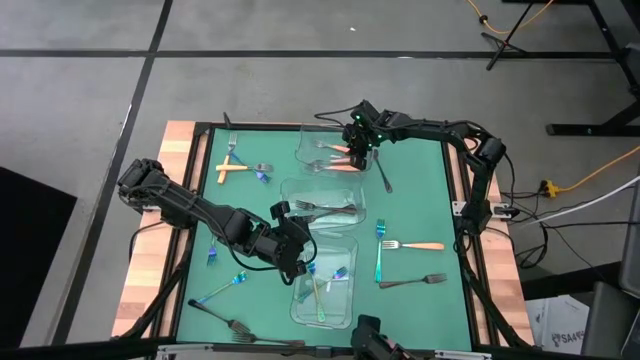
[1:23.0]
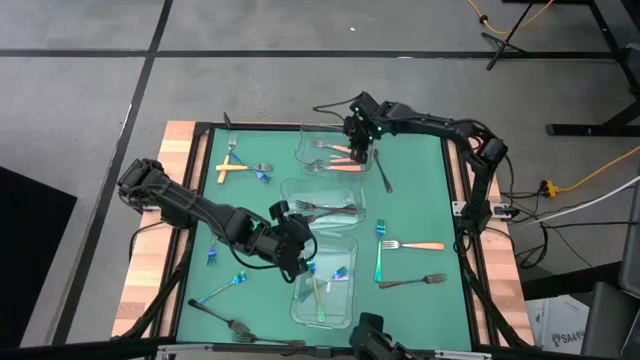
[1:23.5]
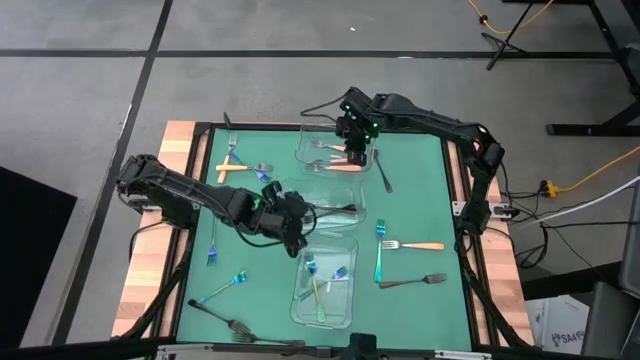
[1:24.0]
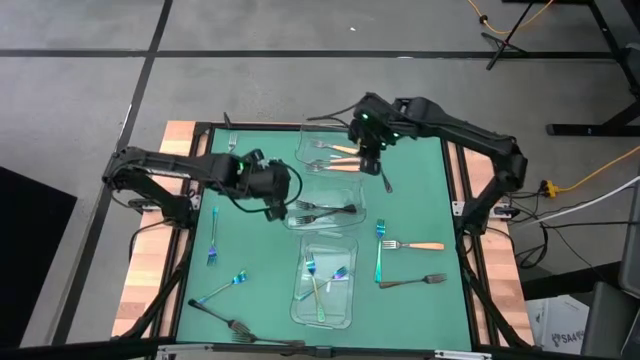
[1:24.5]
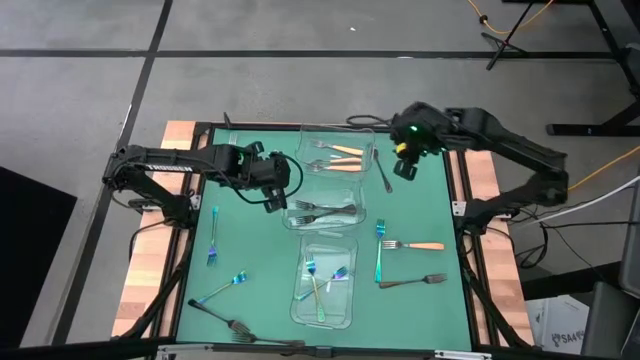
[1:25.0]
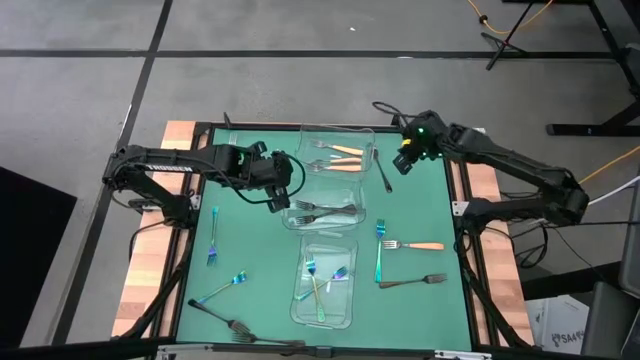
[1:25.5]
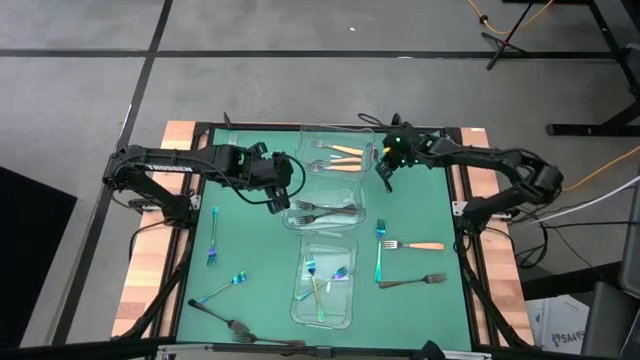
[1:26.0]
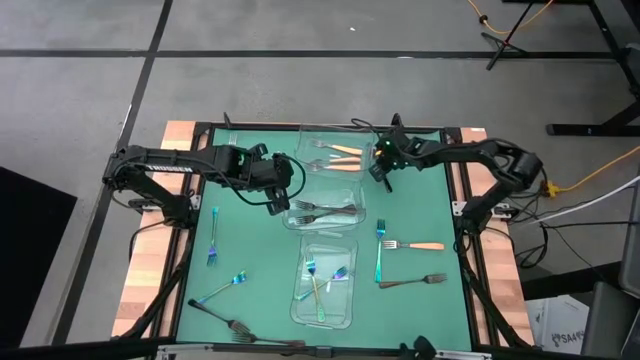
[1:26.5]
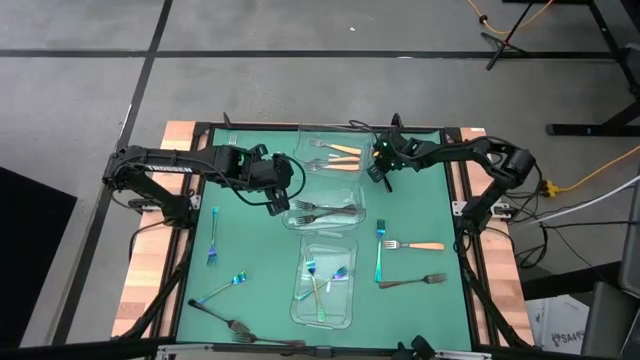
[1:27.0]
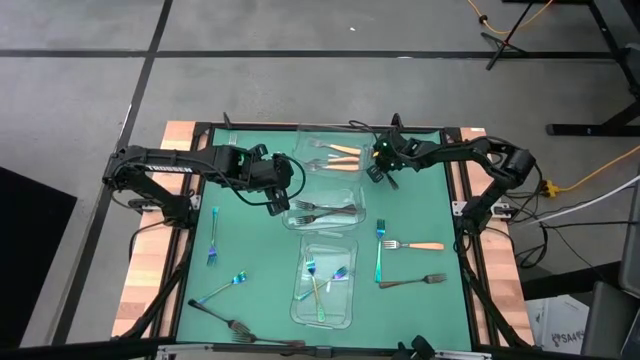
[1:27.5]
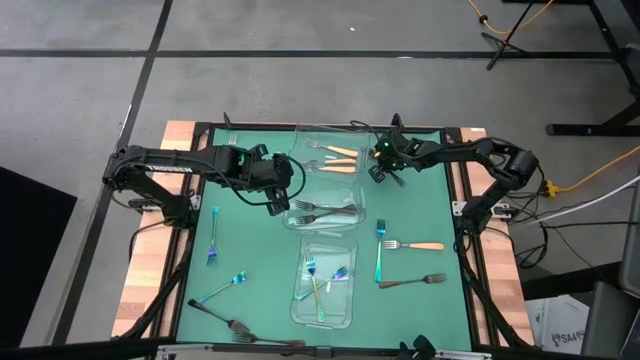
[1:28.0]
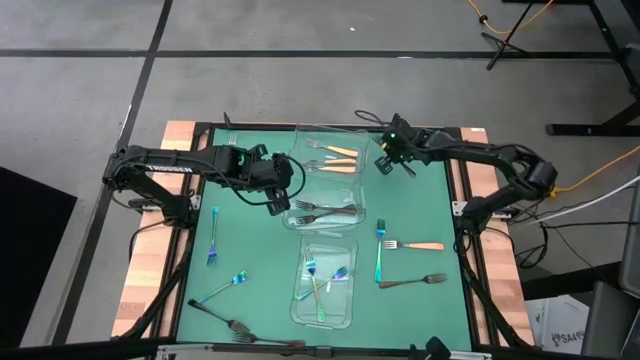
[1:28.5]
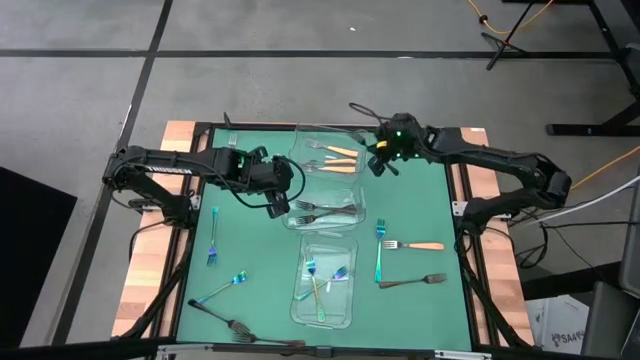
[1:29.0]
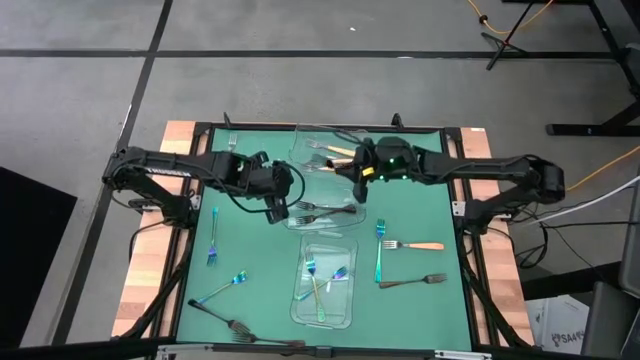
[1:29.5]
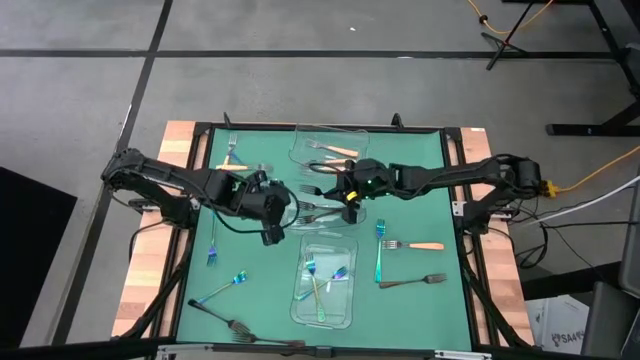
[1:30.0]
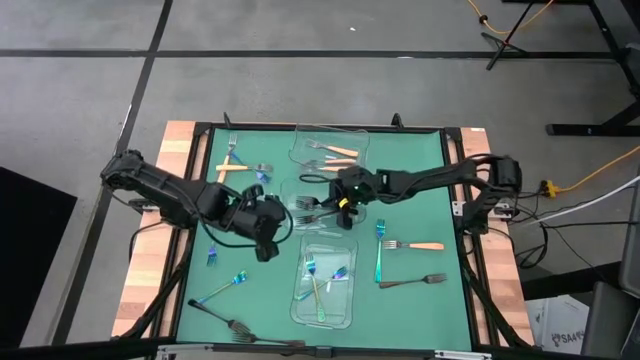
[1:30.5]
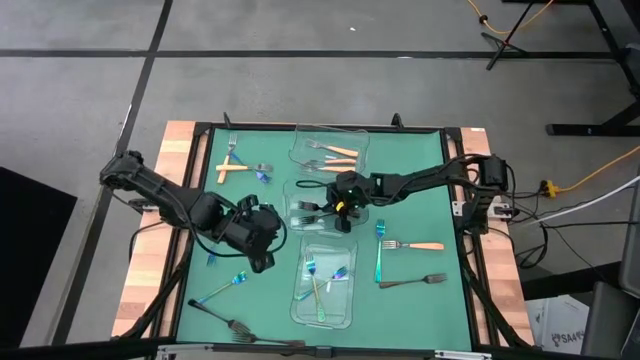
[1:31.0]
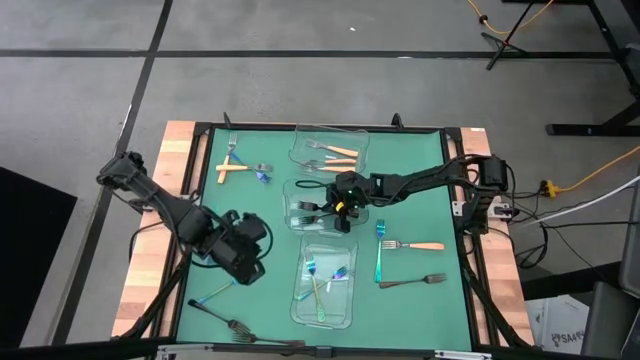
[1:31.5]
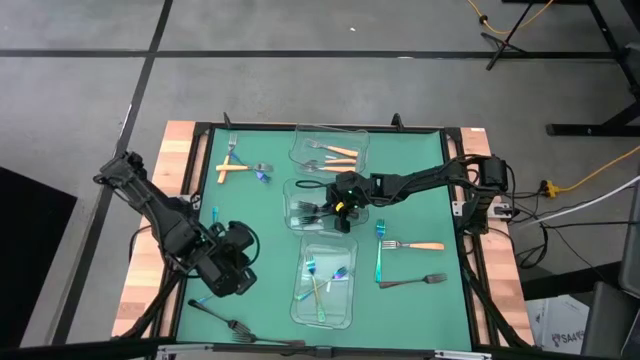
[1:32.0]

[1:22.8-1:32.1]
Task: Sort silverware by color (type)
Put the black fork into the middle transparent bin

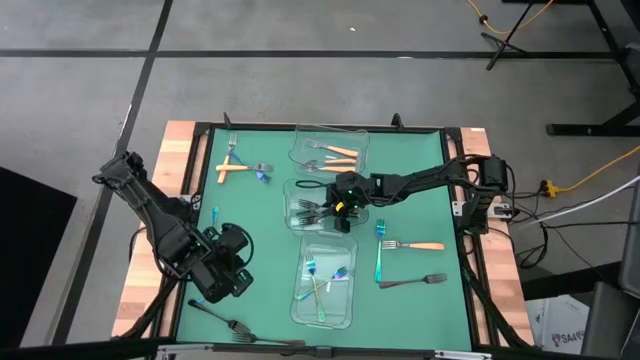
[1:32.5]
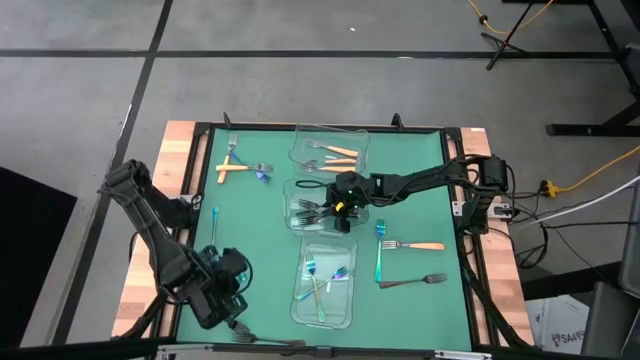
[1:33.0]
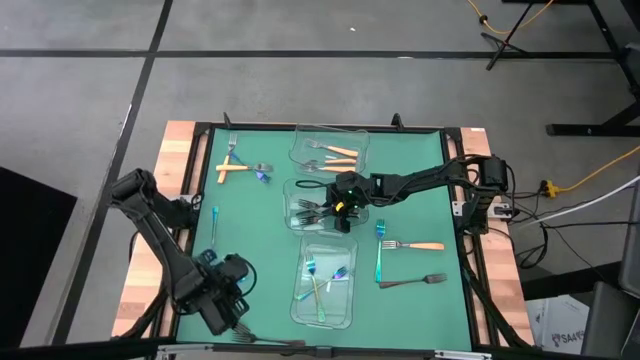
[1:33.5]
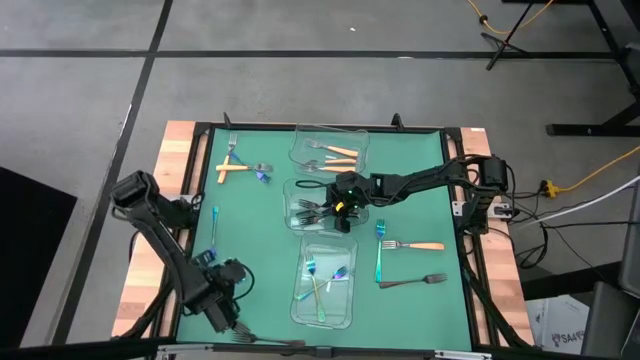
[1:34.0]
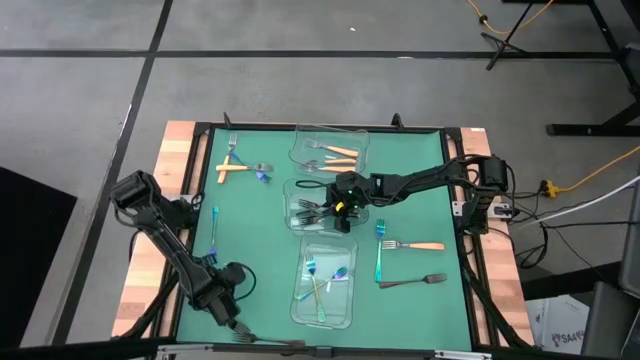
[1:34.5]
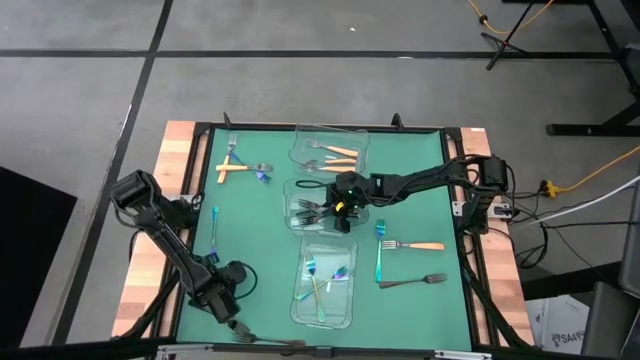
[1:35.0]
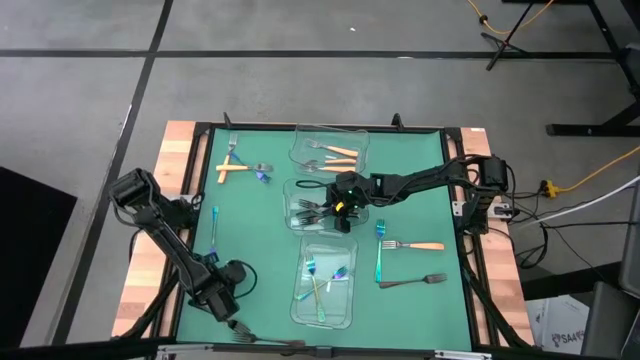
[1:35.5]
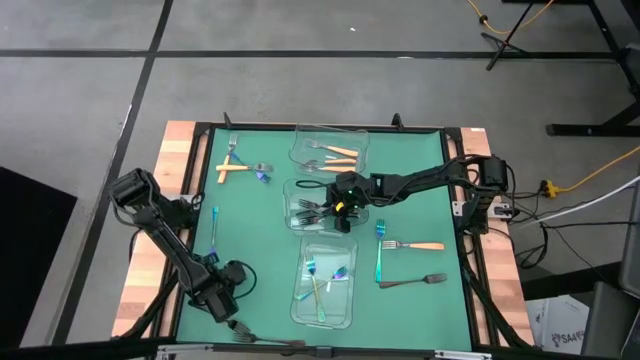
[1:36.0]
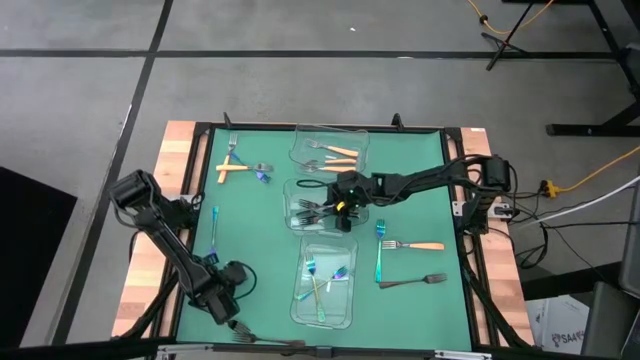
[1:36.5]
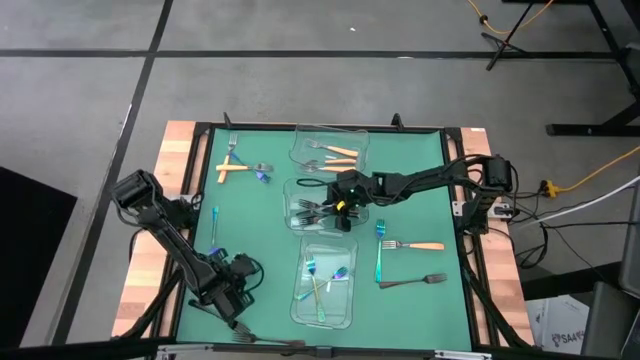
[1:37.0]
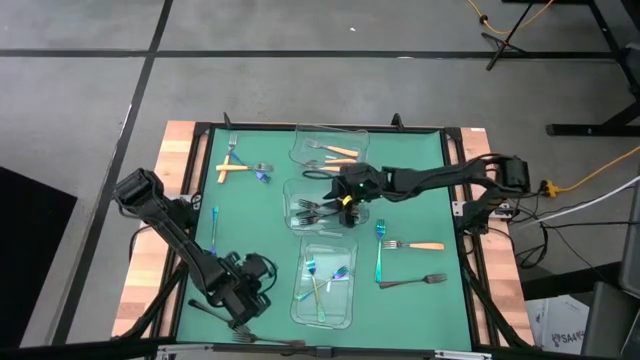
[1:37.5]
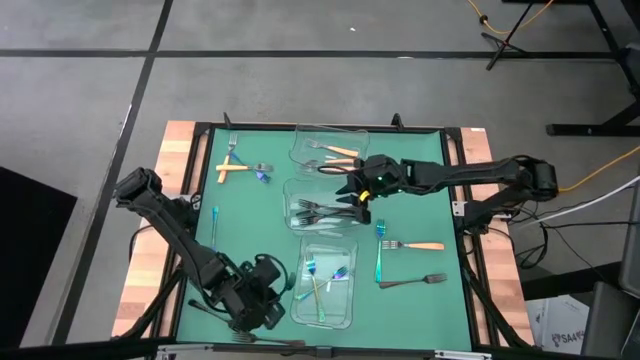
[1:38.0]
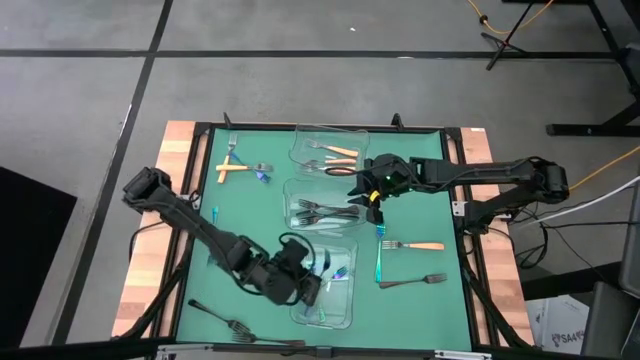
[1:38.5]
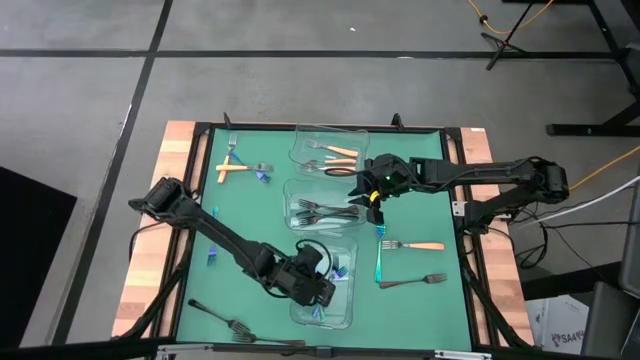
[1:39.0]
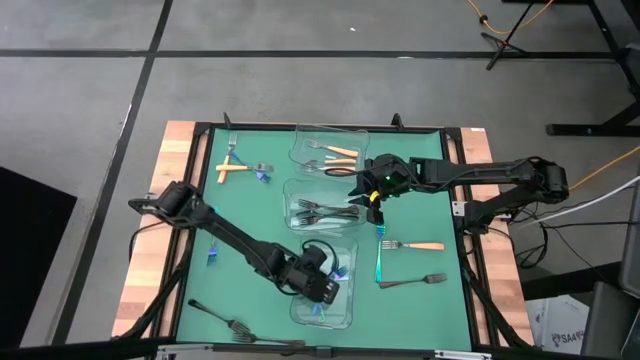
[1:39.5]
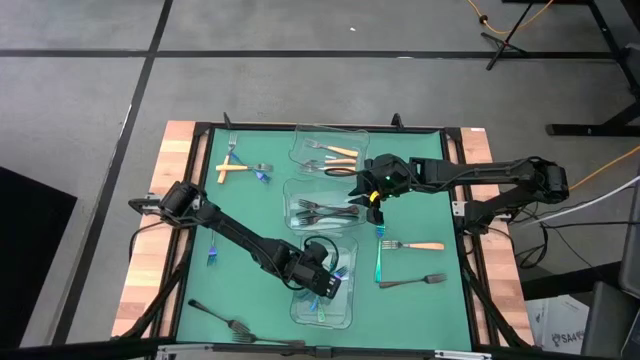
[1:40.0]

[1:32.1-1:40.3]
Put the blue fork into the bottom transparent bin

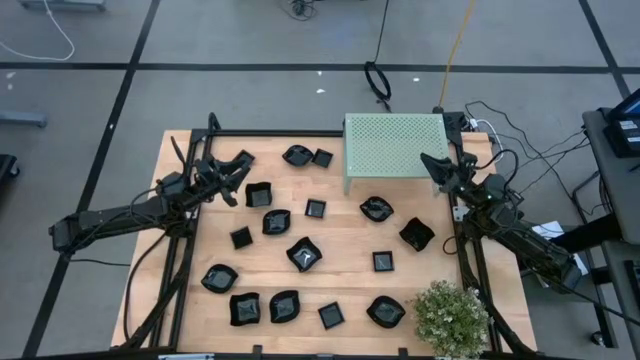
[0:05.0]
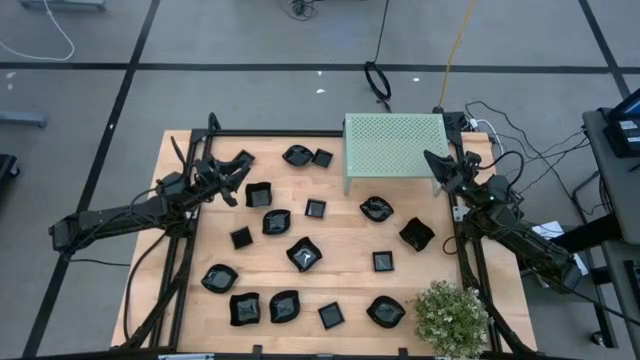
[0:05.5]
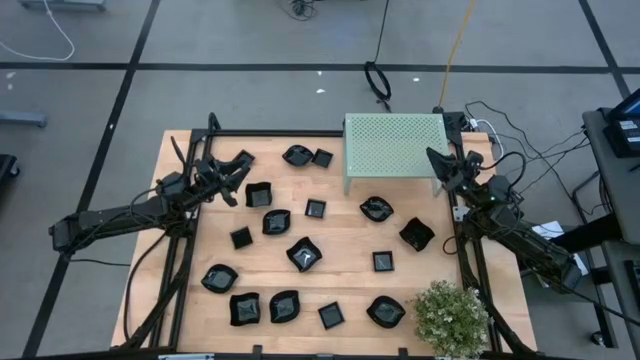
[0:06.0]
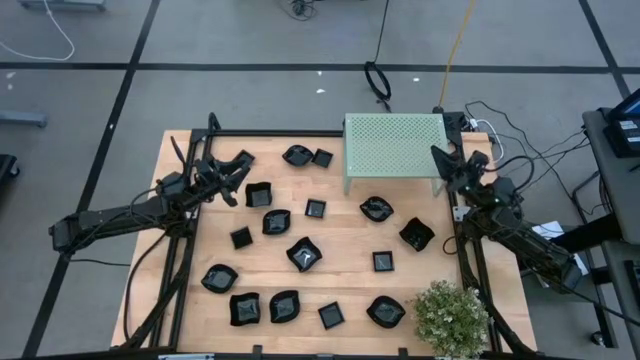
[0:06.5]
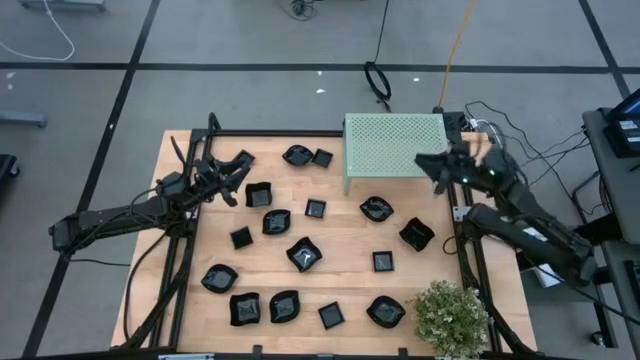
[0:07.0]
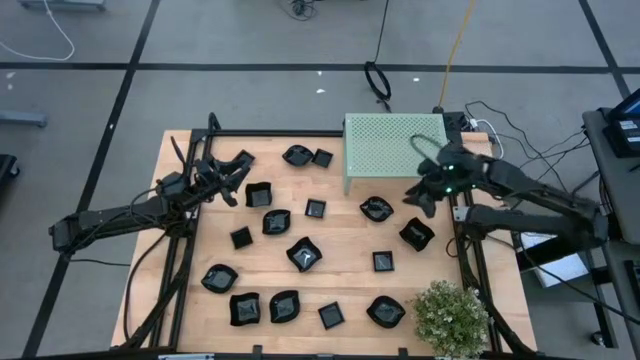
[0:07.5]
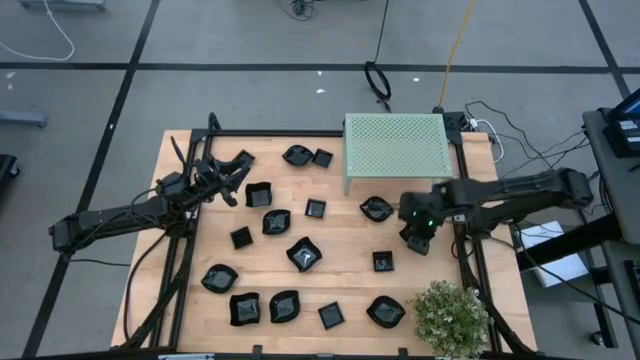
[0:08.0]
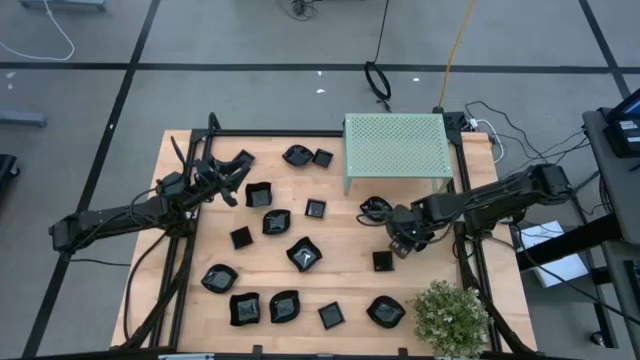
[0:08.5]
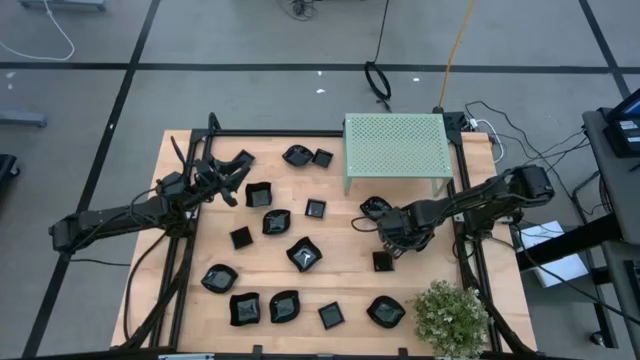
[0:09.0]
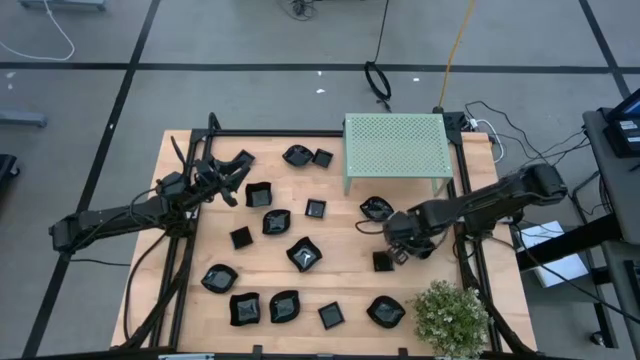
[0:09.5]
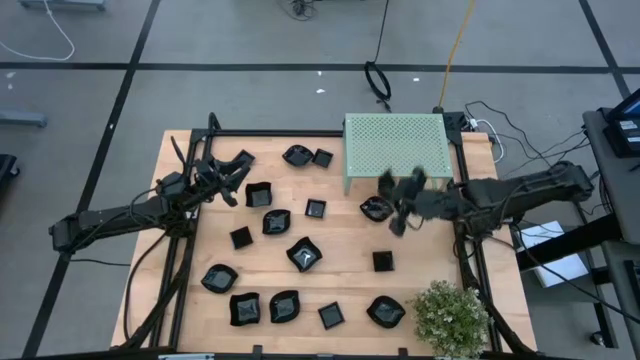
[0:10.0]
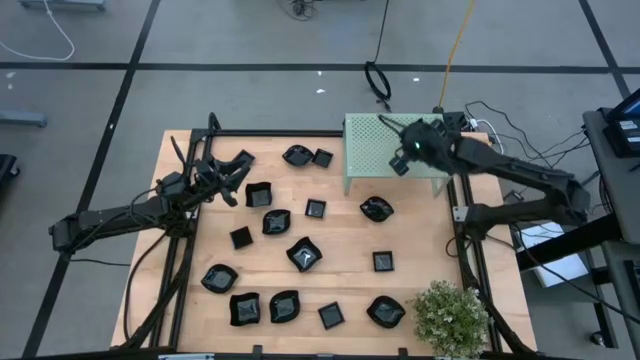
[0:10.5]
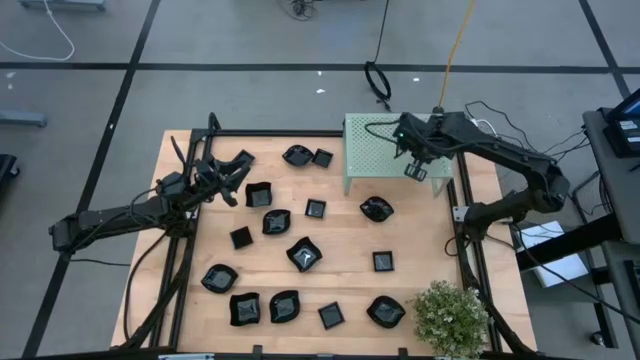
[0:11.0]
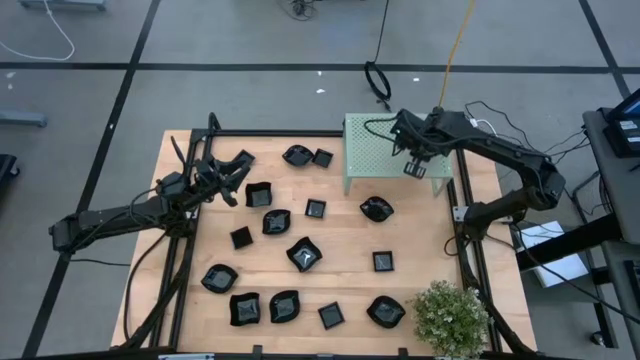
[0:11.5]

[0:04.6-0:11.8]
Task: Pick & Place Mini shaped plates
Put the distorted square plate on the shelf
